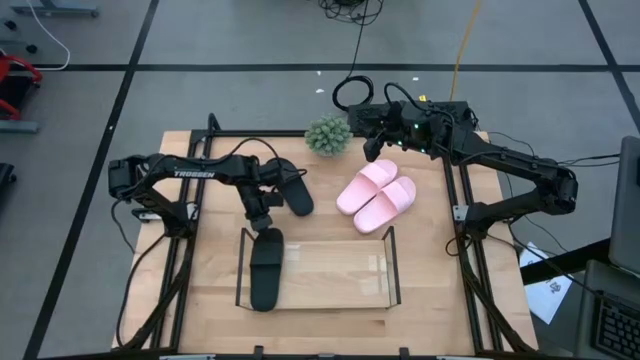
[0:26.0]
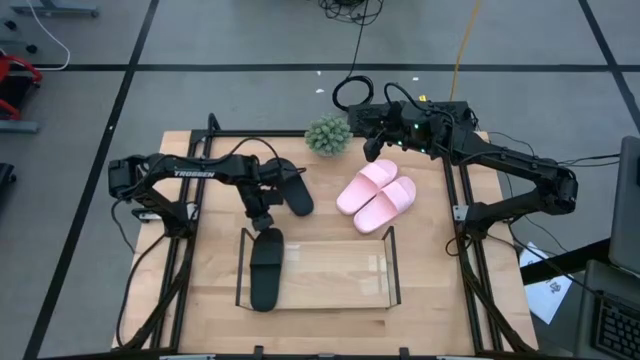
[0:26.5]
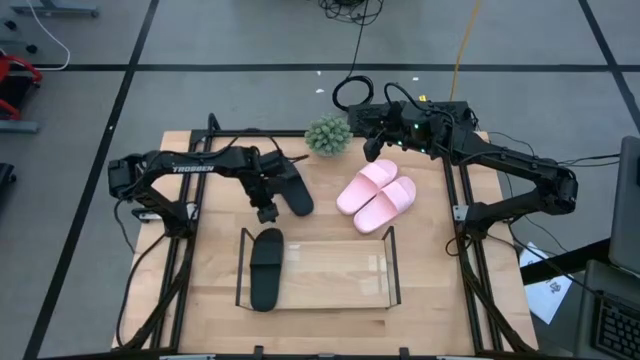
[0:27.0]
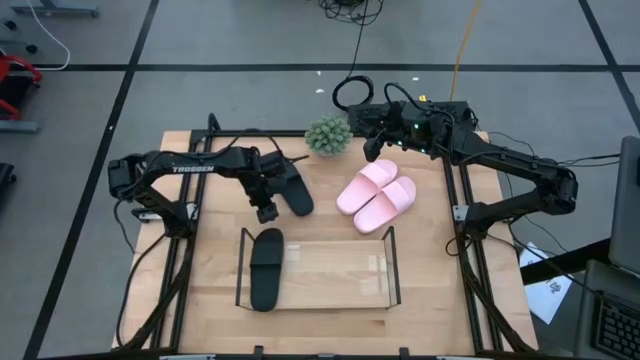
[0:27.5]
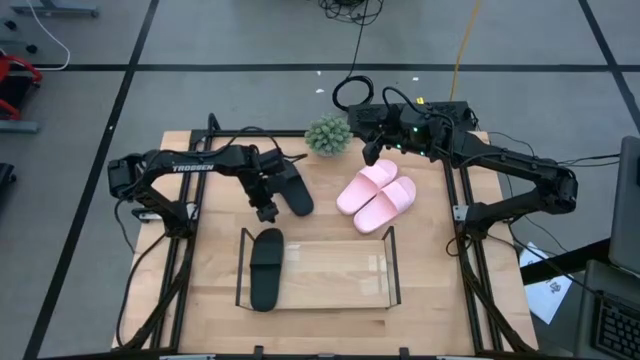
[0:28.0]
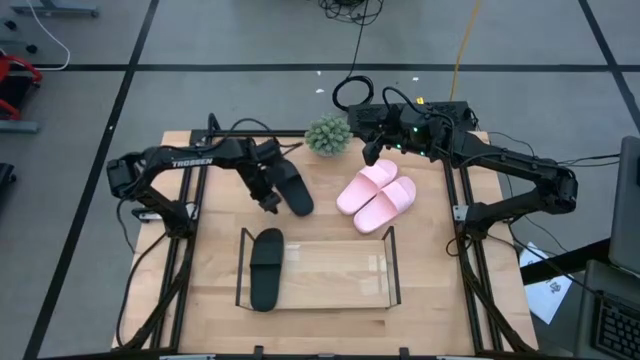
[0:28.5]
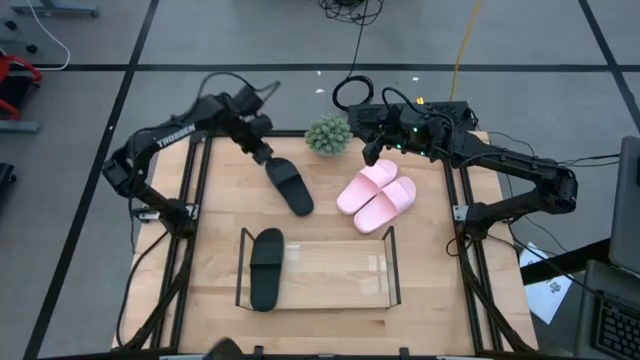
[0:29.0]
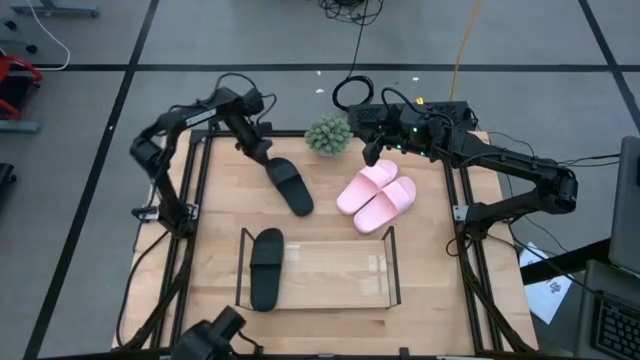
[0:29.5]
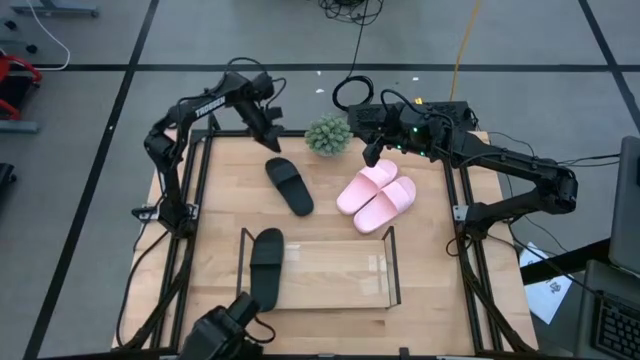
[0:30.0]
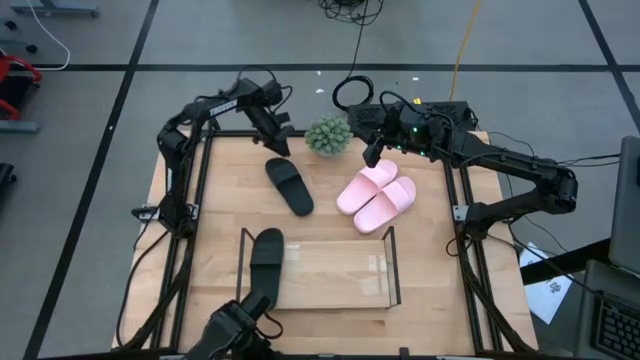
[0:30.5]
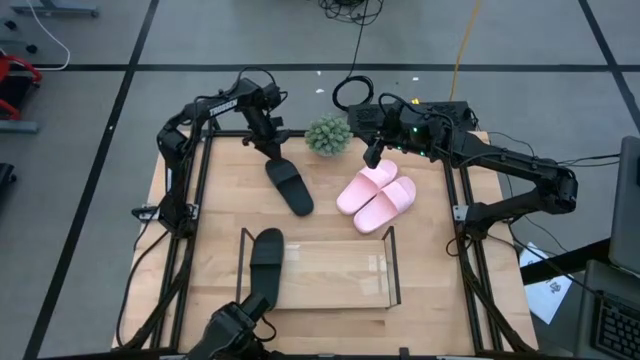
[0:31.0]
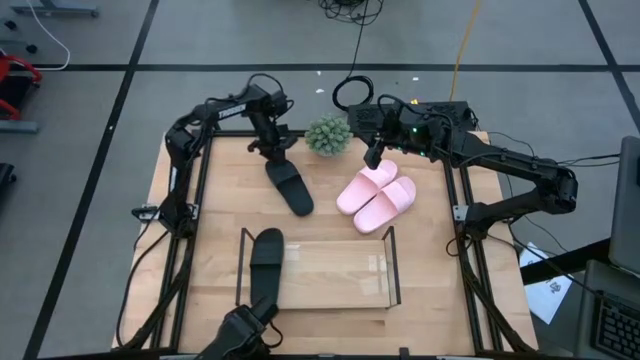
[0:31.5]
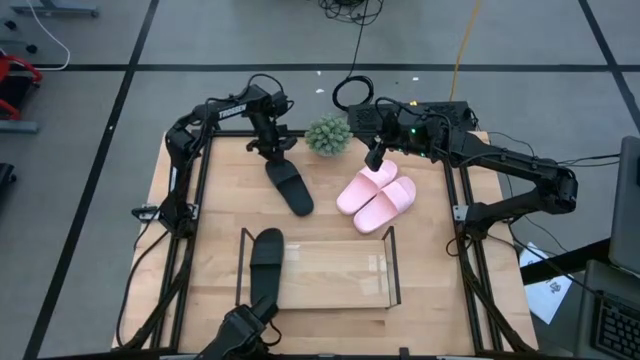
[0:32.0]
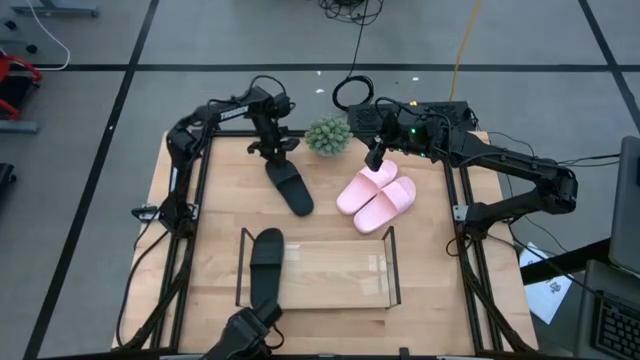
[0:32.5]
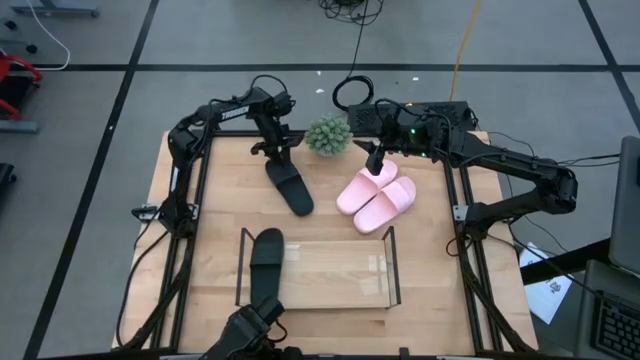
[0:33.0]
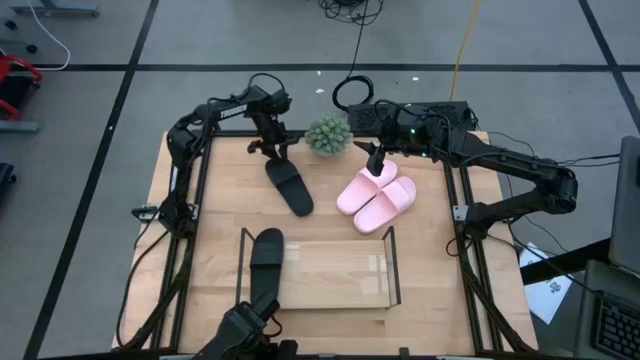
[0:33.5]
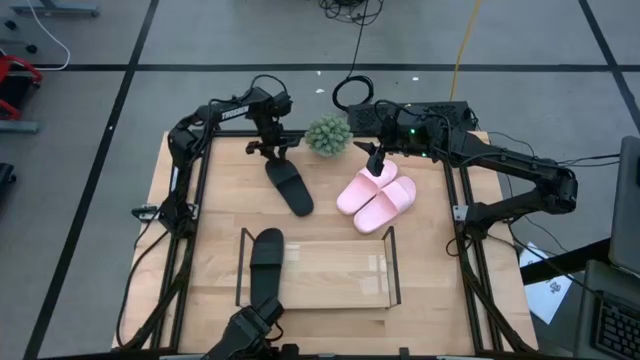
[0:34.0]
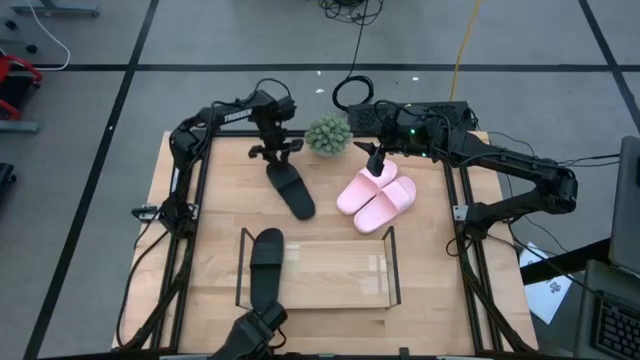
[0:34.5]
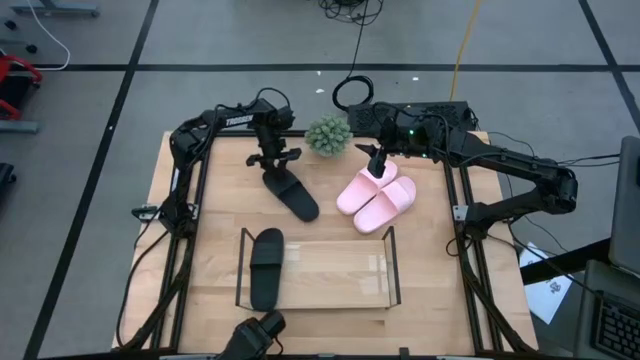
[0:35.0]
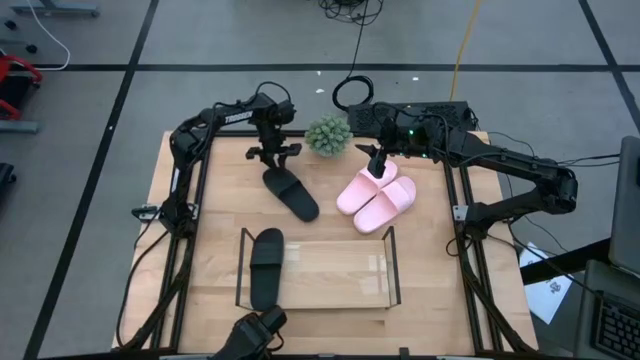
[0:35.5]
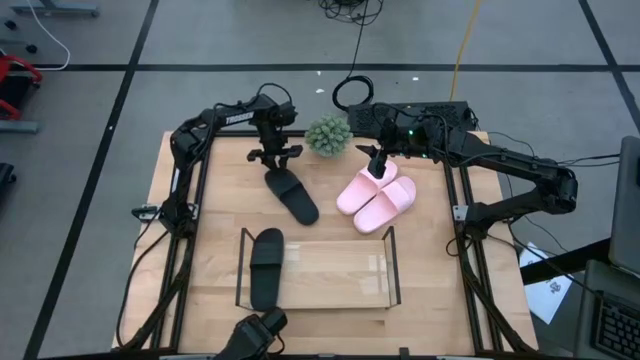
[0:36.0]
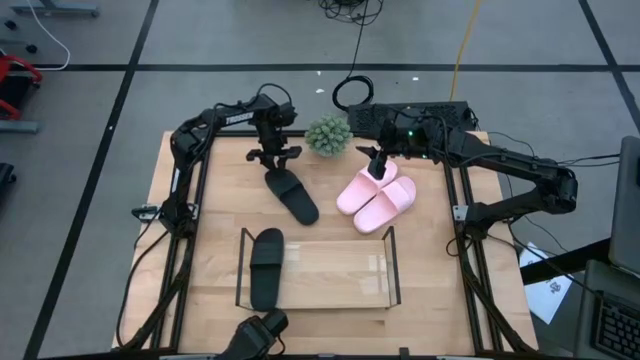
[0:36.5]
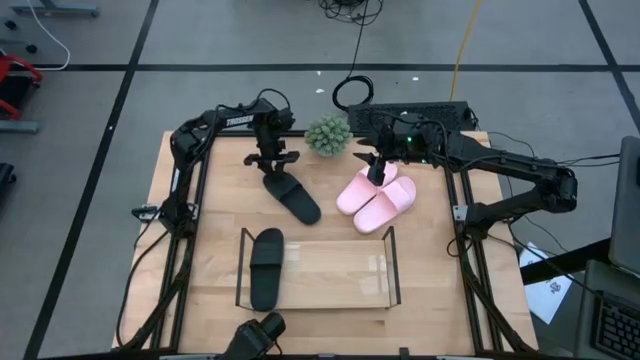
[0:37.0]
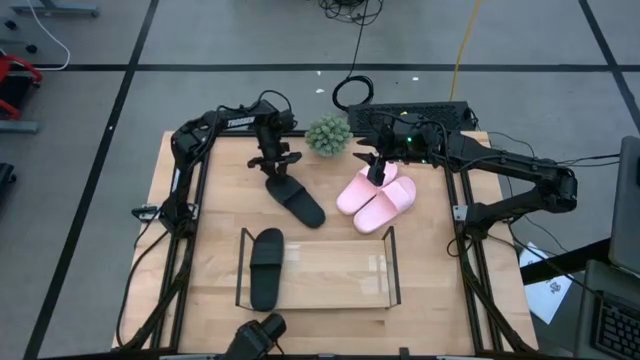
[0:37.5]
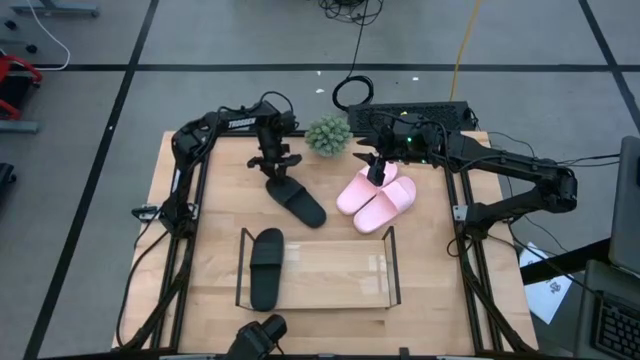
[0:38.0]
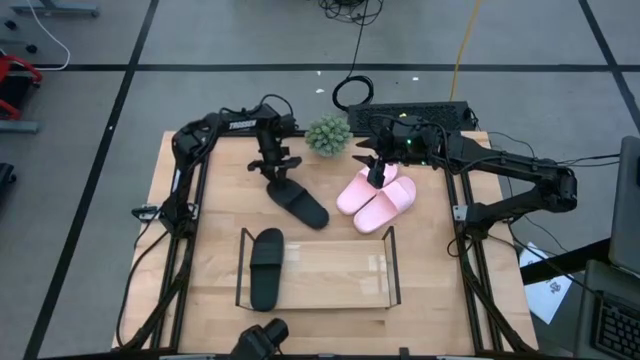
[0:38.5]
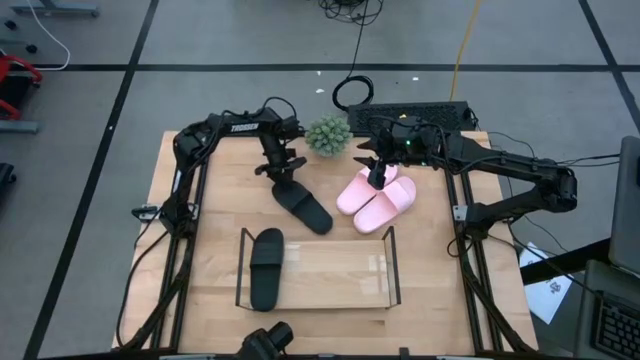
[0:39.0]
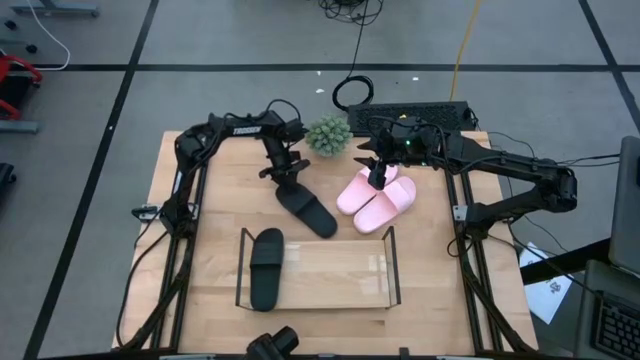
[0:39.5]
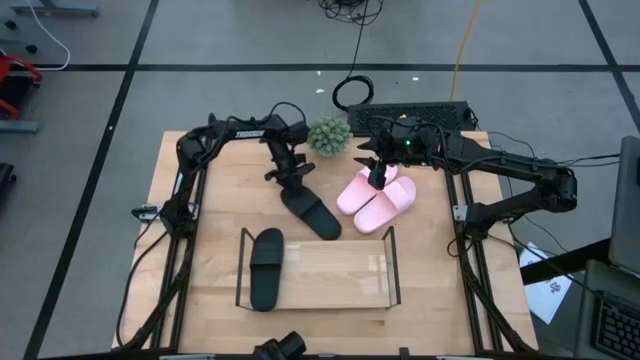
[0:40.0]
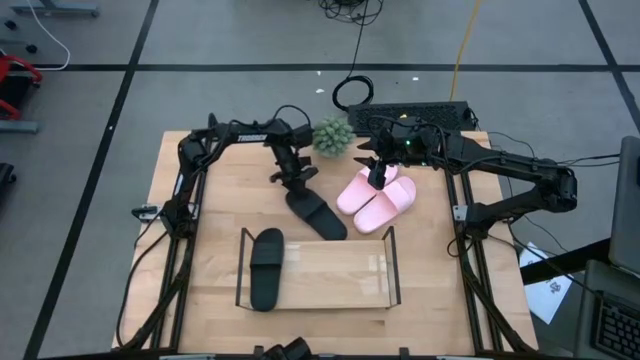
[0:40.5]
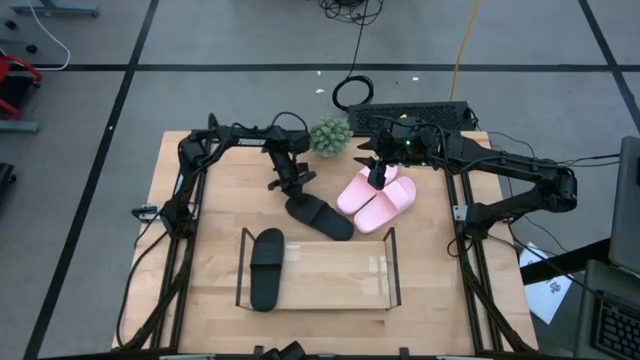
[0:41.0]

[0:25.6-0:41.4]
Task: Pick and place slides into the shelf
Put the black slipper on the shelf

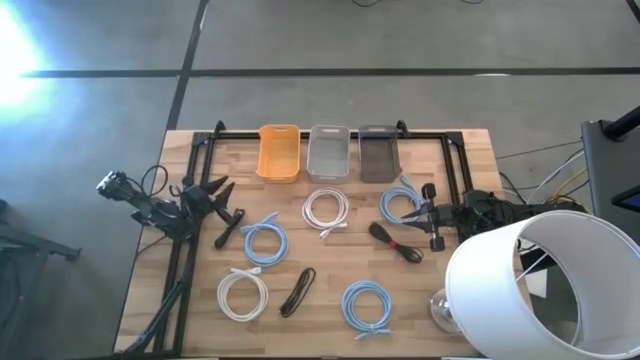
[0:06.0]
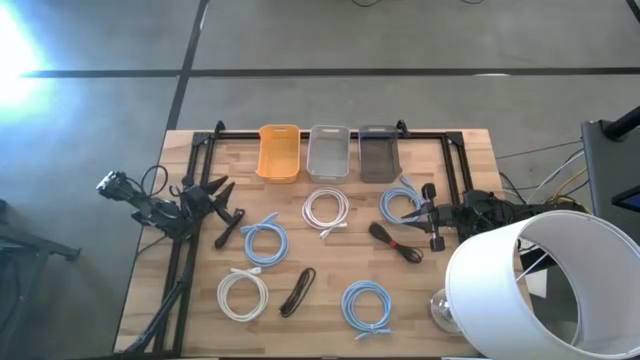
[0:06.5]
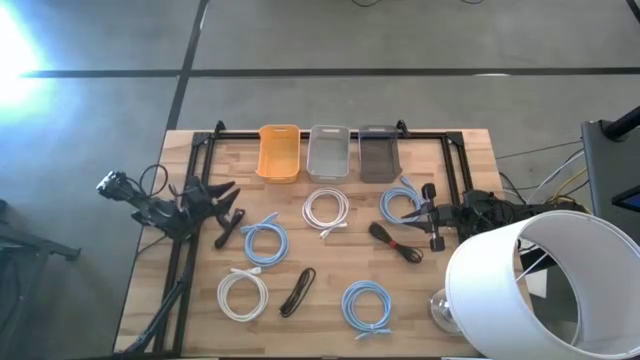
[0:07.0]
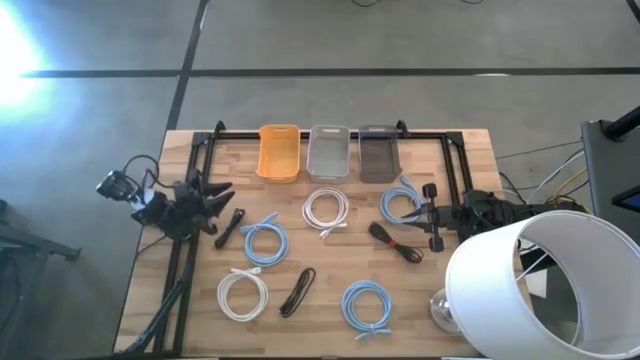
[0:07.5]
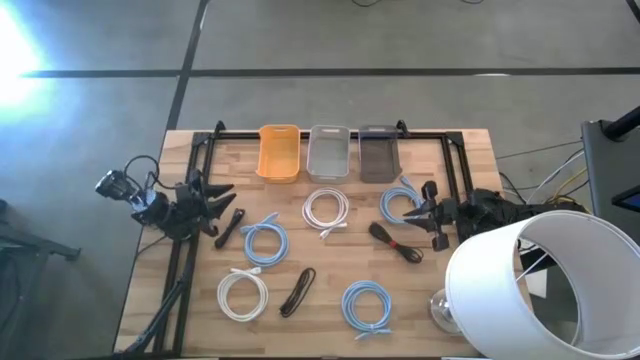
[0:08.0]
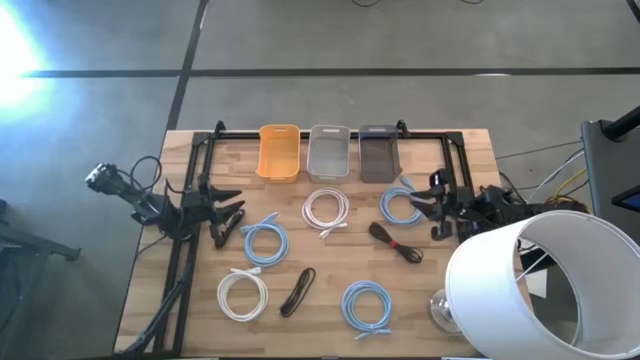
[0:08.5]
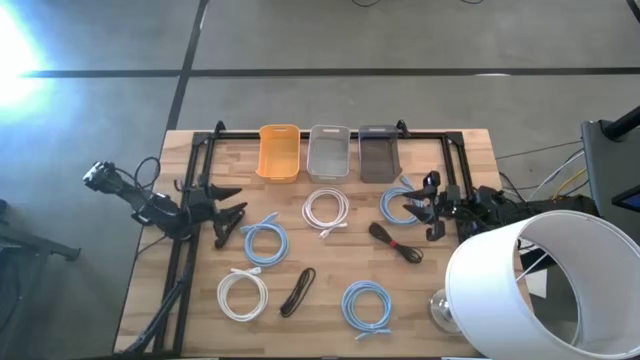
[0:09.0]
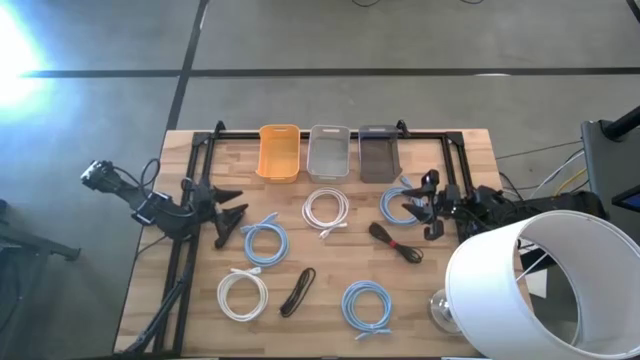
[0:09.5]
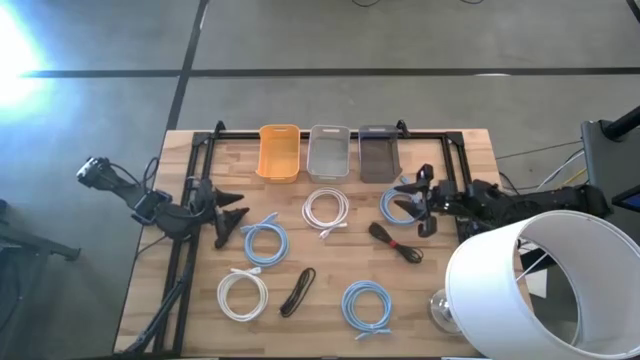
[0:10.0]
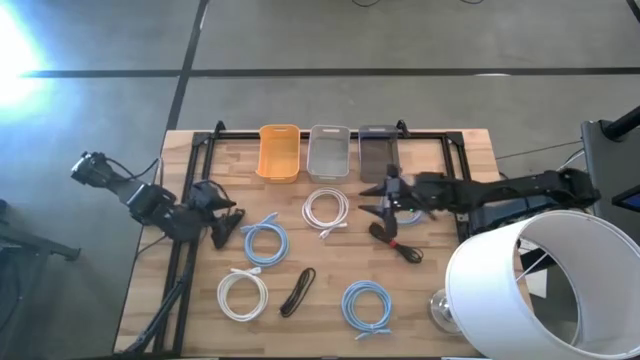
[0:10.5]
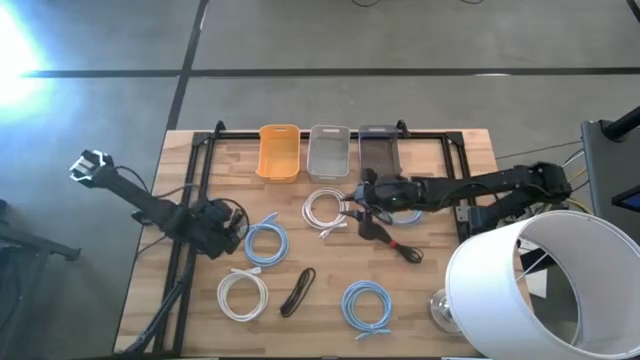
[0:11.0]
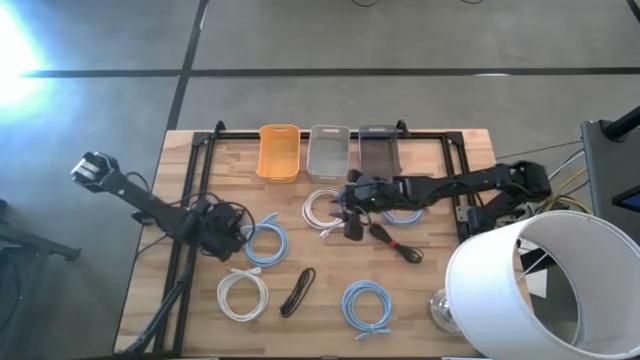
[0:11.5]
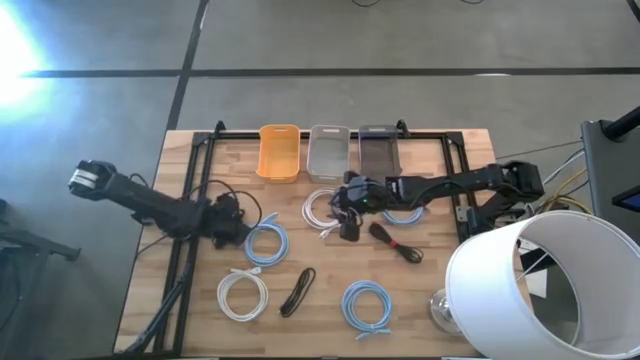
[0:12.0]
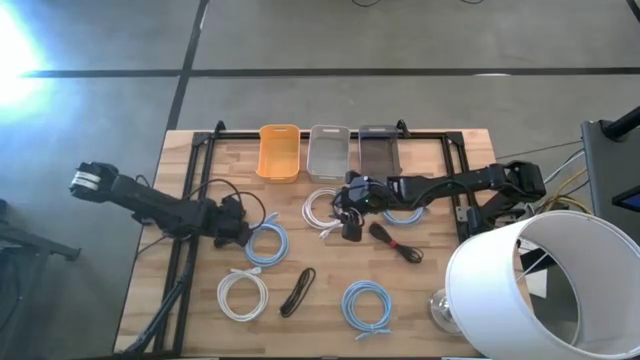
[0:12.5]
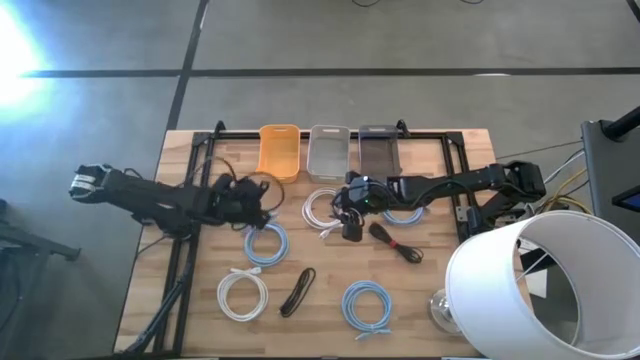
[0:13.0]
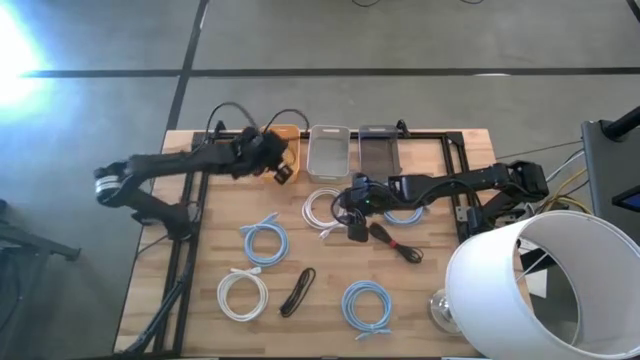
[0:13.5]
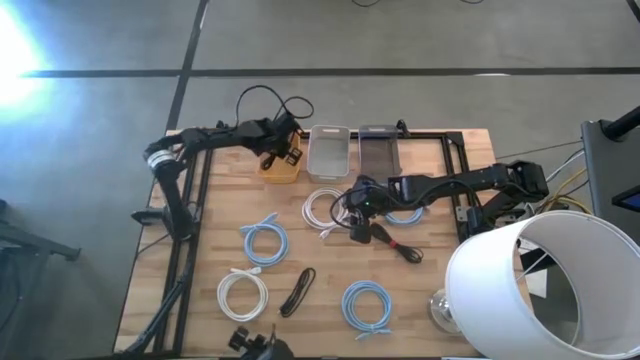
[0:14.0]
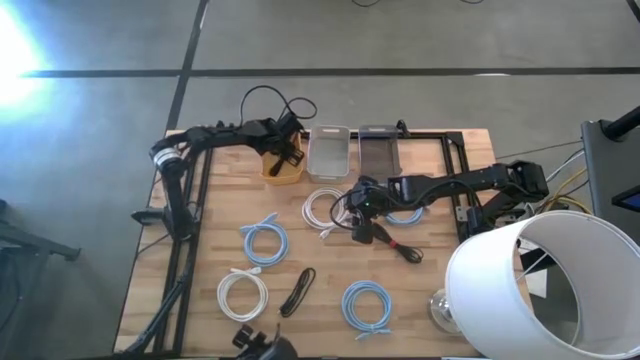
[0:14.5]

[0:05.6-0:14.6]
Task: Pick & Place USB Port
Put the top left black charger cable into the yellow bin
